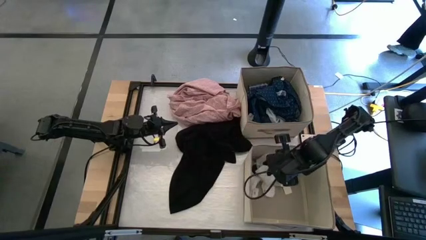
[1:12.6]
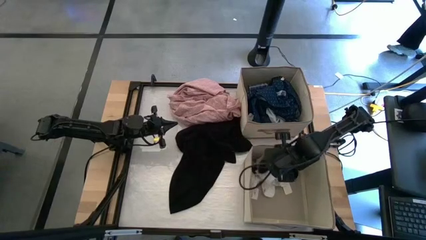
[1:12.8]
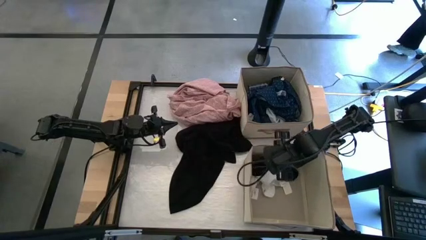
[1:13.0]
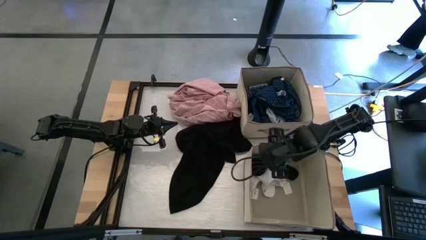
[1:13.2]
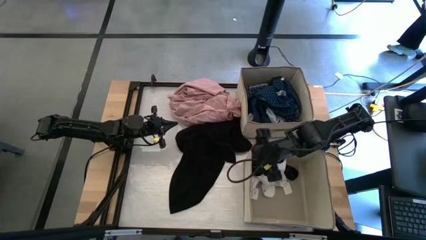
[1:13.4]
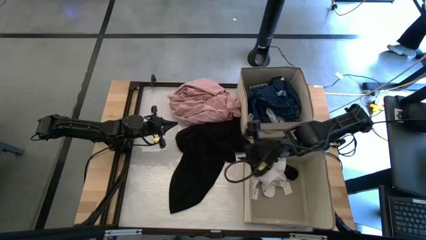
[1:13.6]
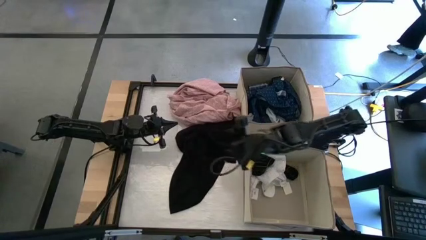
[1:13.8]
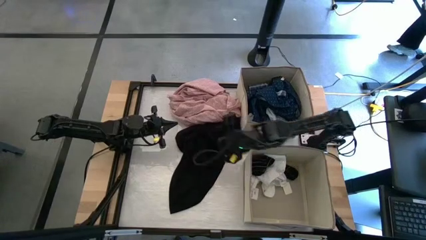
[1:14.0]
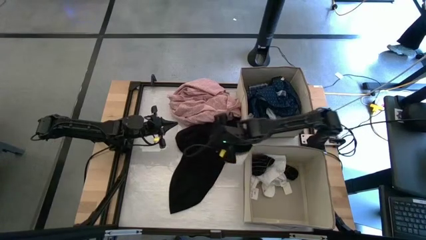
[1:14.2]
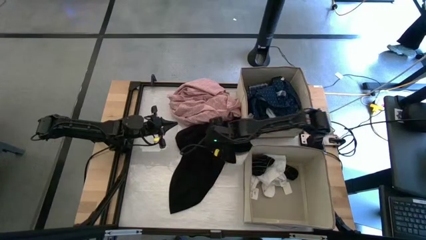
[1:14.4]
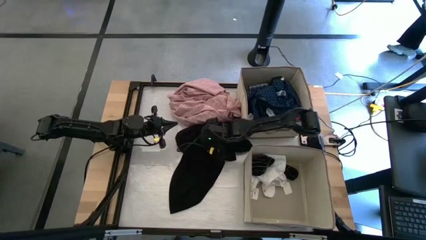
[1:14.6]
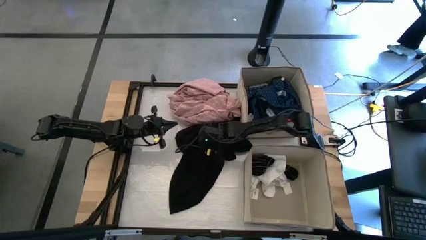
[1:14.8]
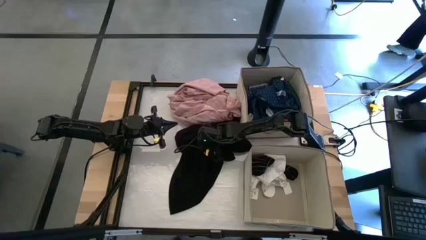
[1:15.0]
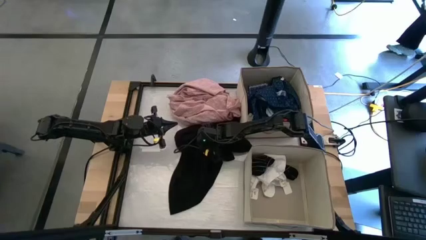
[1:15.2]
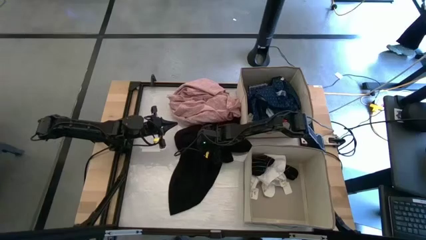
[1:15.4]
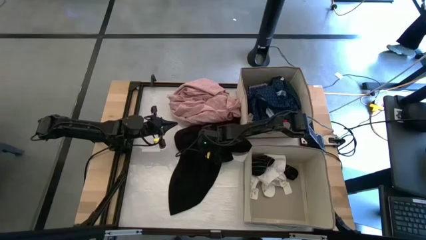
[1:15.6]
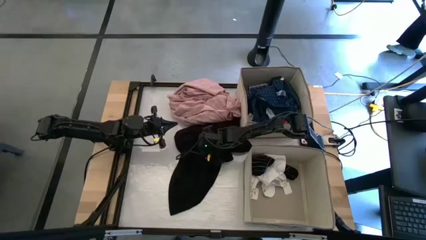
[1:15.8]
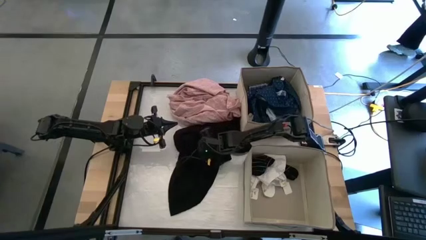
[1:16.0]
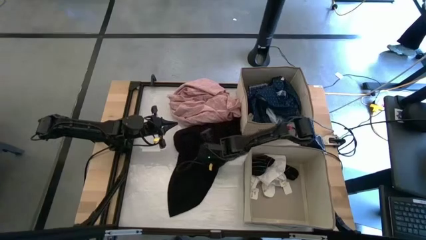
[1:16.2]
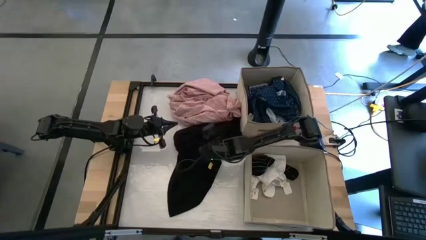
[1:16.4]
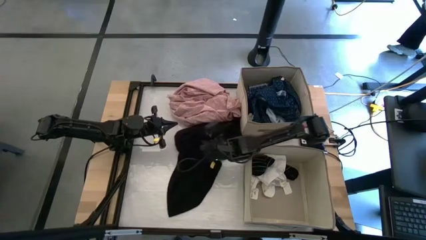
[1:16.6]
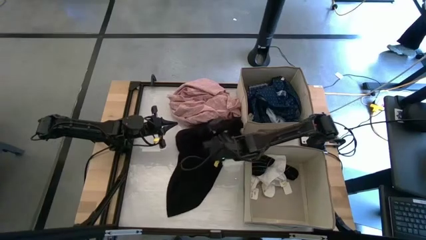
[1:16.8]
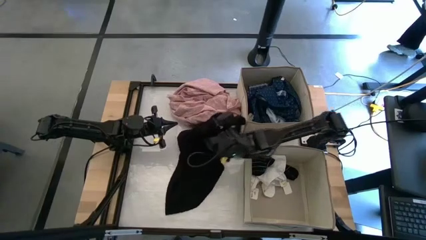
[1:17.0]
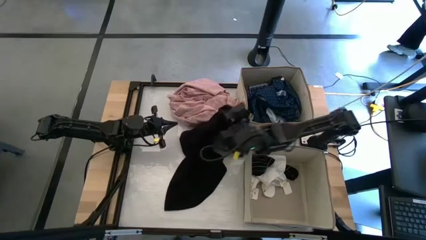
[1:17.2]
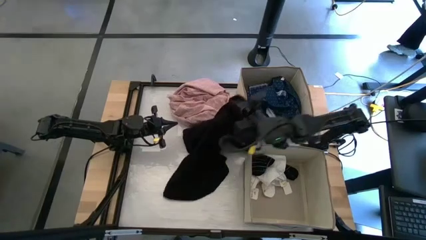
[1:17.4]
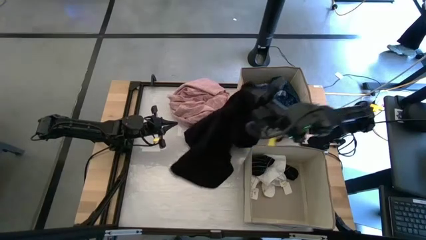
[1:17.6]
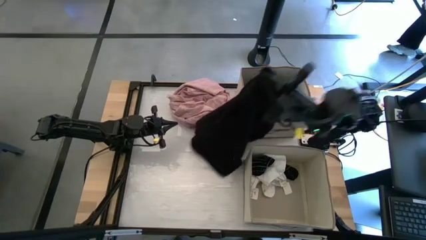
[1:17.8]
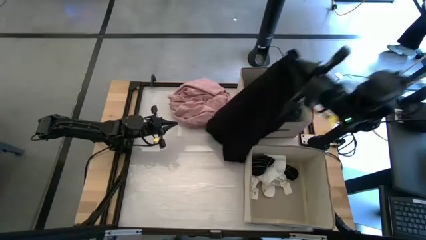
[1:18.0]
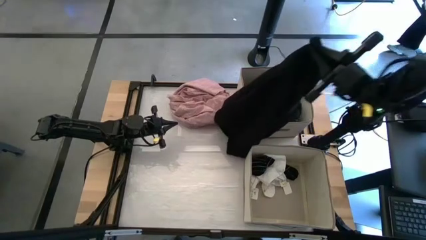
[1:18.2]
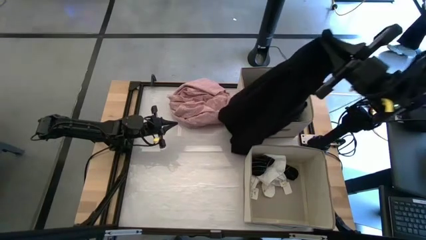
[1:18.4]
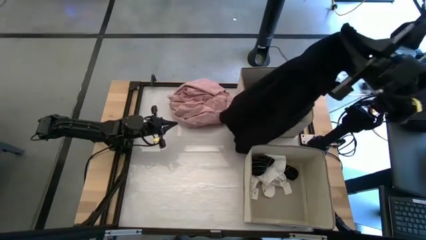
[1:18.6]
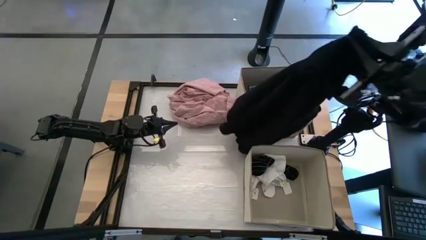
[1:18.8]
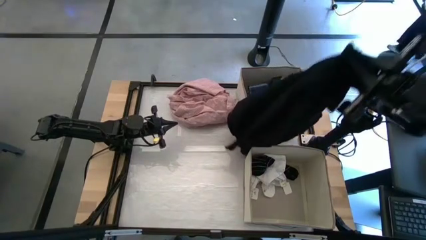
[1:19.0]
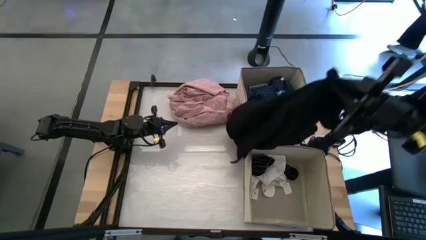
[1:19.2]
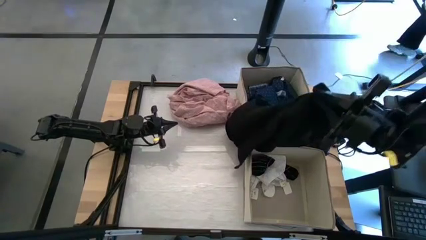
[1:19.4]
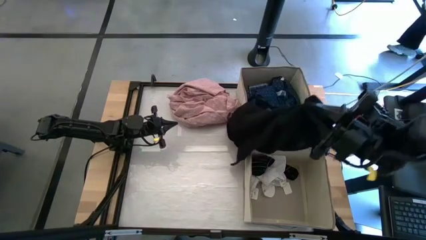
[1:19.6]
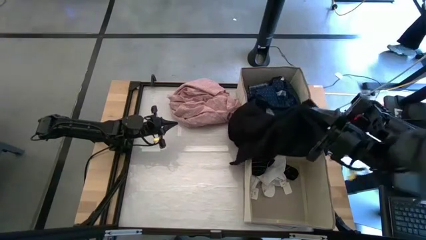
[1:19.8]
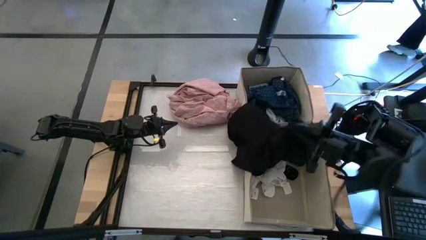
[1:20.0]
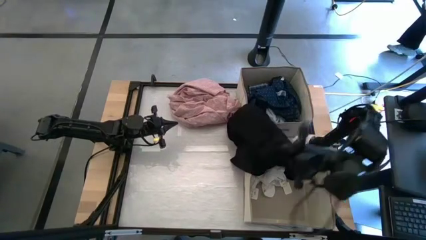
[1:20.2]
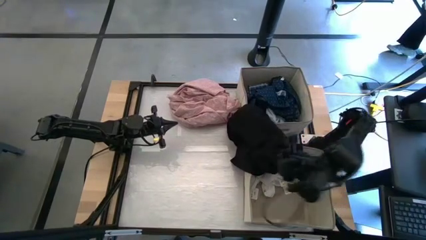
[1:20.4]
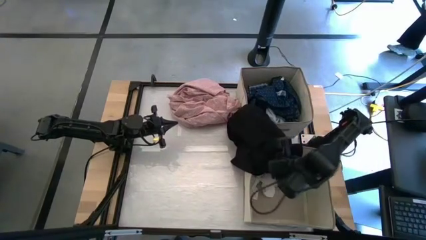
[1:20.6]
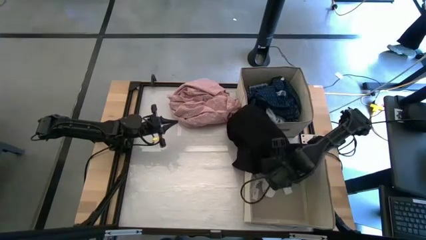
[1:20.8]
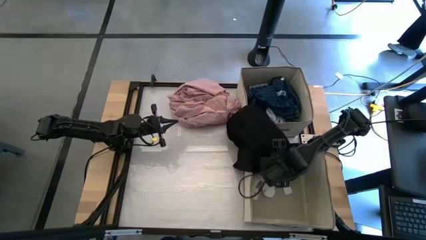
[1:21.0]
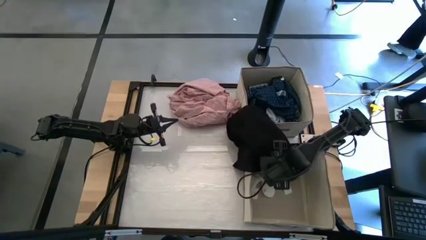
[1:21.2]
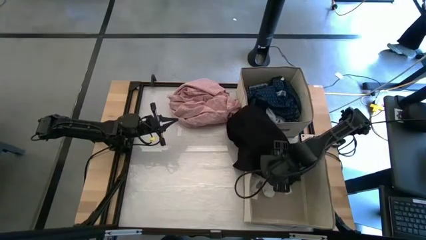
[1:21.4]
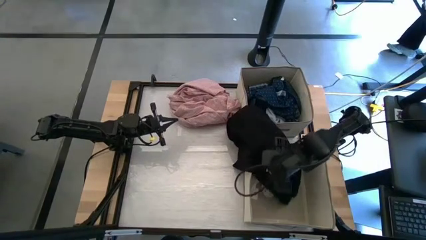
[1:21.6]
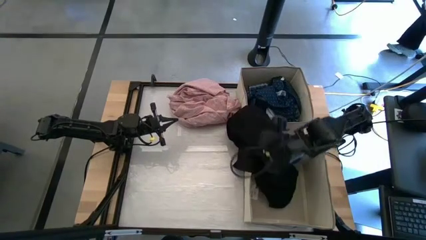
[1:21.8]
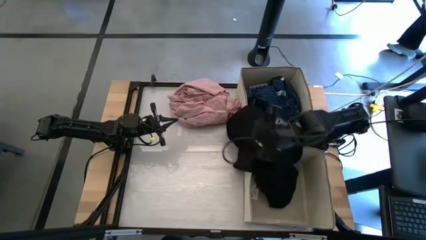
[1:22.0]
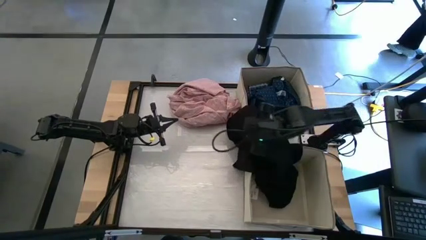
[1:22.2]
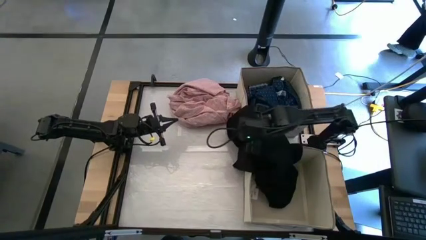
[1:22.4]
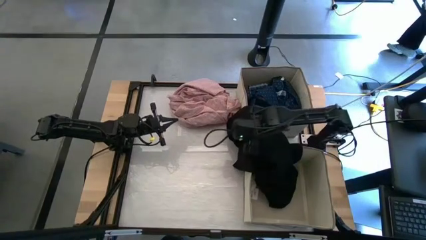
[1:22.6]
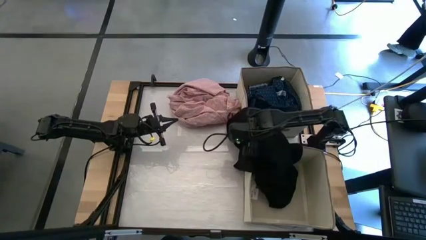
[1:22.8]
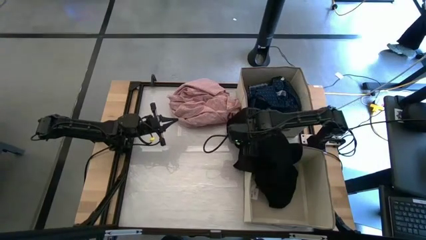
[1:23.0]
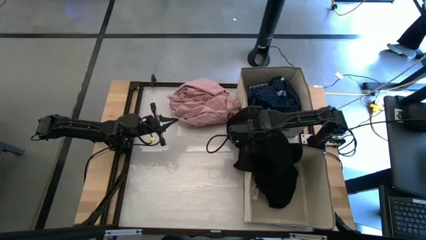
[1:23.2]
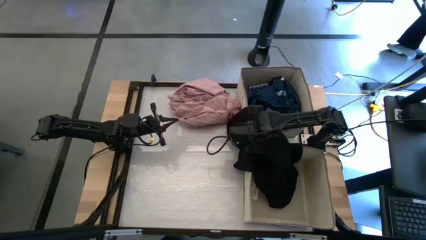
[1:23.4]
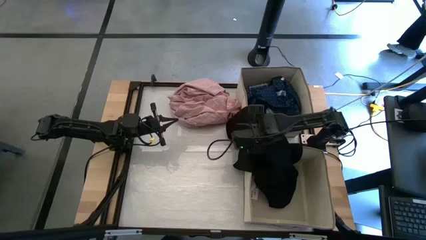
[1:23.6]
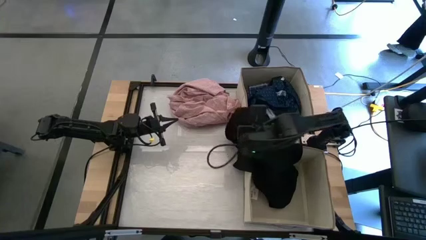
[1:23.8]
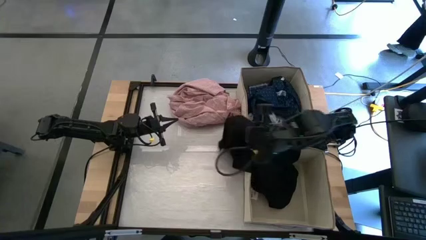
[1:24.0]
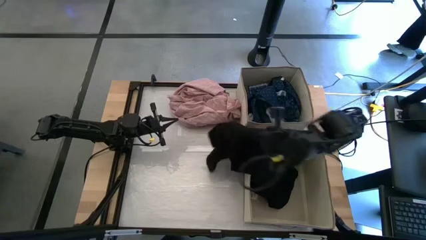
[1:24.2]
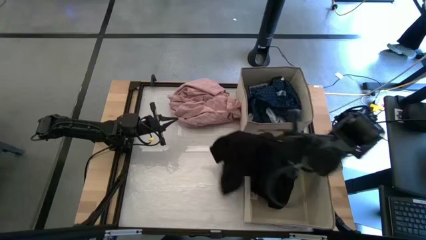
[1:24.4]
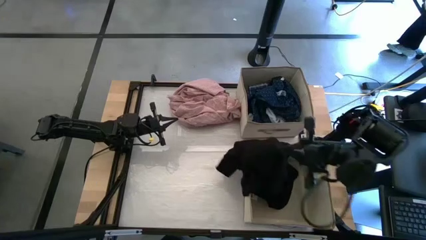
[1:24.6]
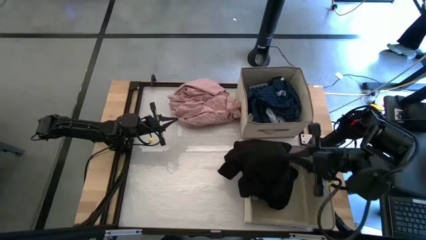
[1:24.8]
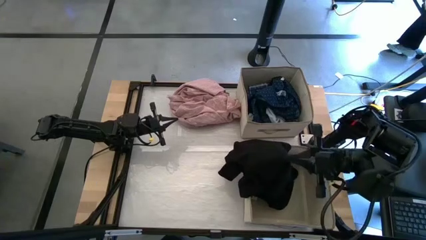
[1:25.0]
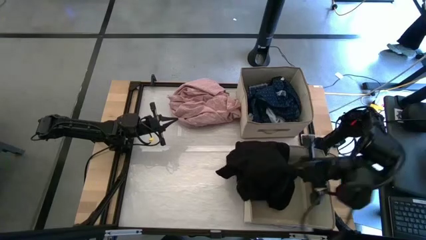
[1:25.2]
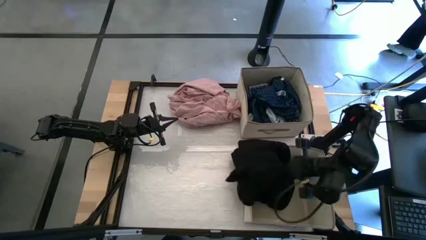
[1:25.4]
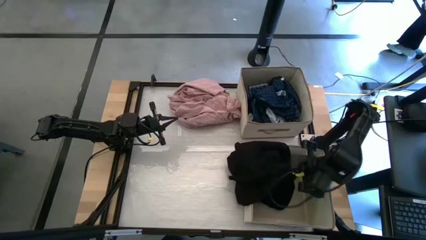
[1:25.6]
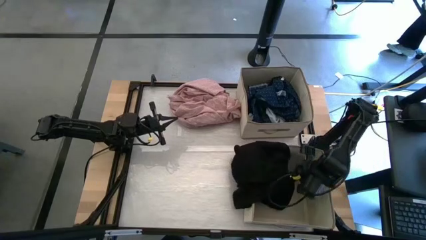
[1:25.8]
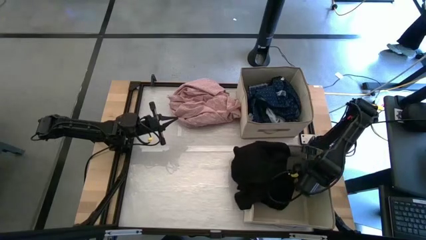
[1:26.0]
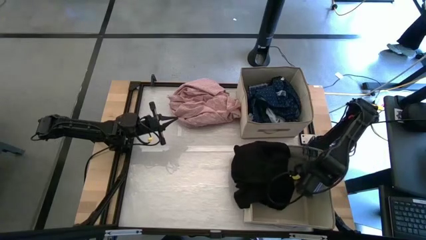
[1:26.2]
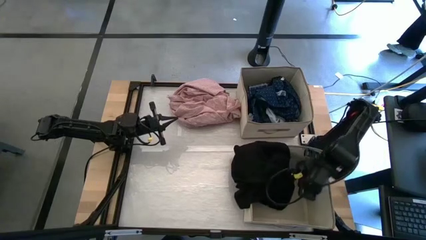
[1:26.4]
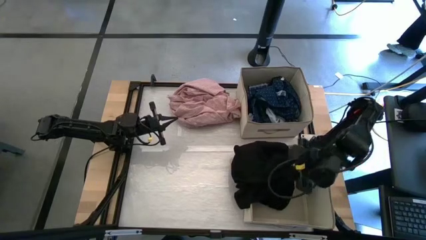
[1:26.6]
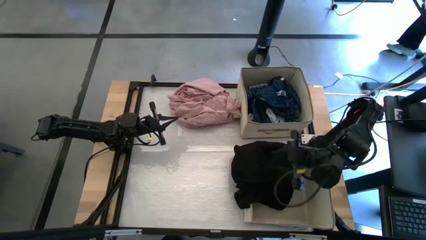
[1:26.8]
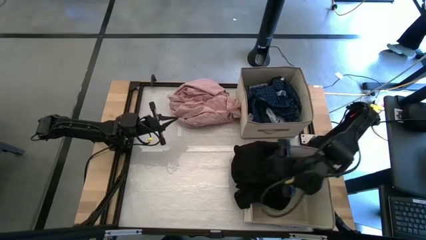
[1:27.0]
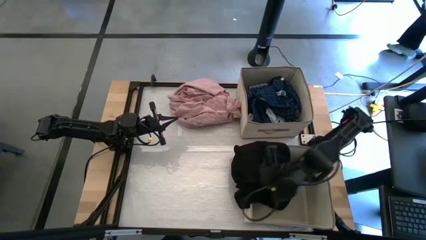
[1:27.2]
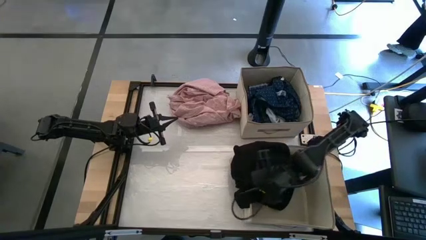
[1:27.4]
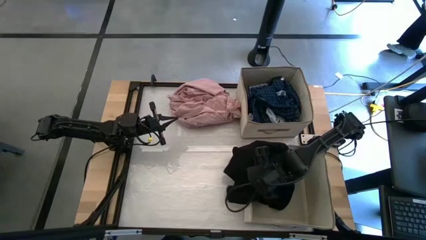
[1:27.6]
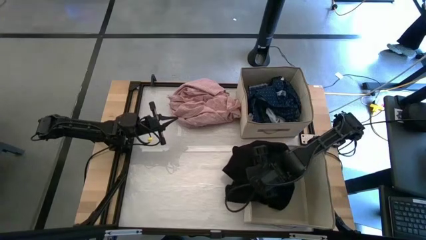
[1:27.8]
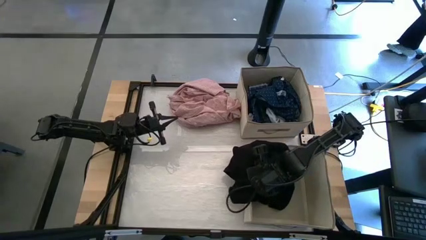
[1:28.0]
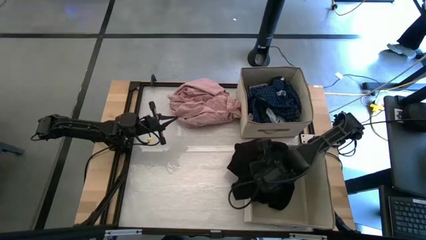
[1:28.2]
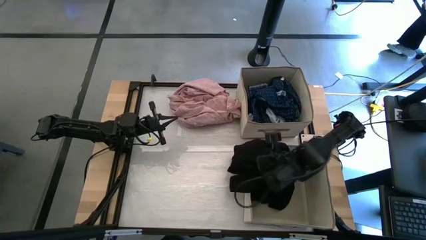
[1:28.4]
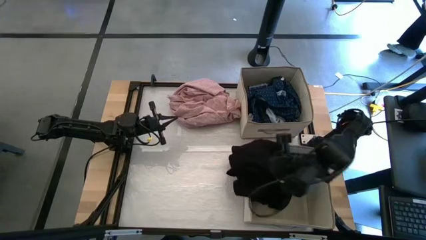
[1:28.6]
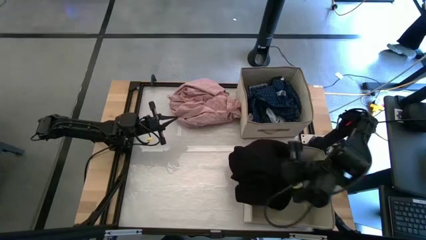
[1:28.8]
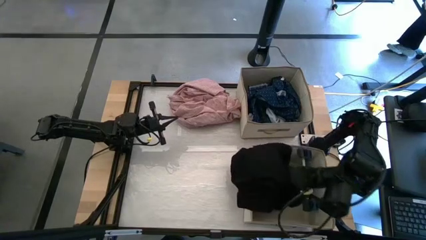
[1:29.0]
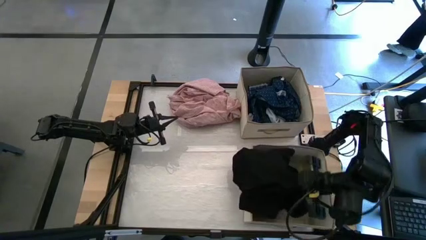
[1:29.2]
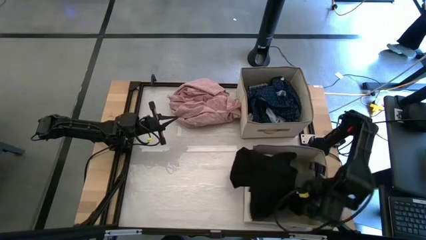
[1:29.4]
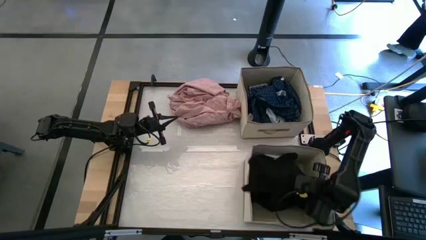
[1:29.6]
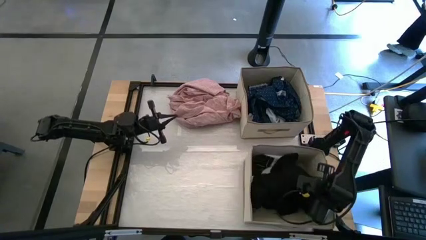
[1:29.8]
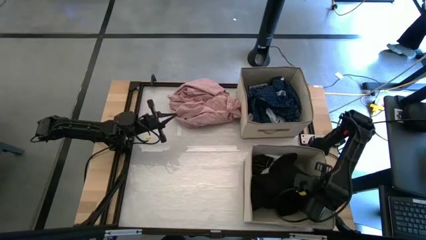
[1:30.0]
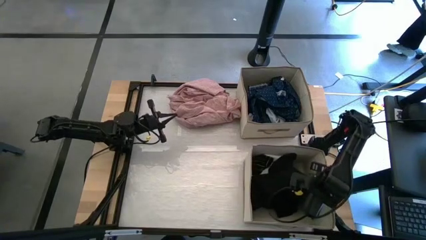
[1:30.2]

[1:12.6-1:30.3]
Task: Sort clothes
Put the black shirt into the bottom laundry organizer
